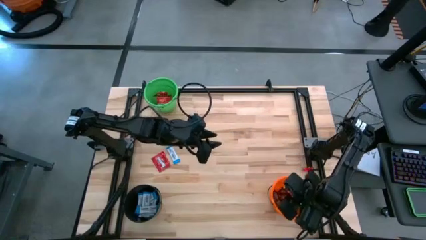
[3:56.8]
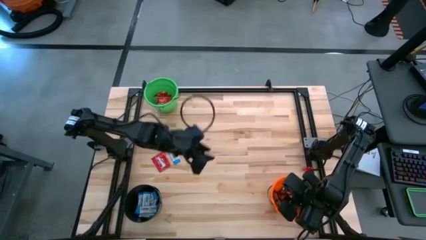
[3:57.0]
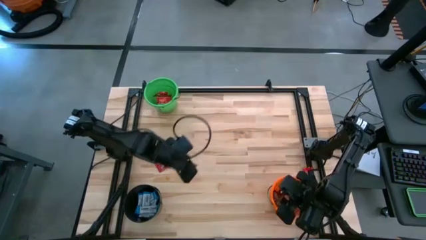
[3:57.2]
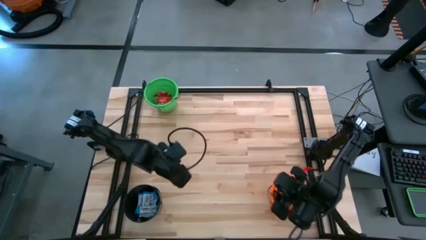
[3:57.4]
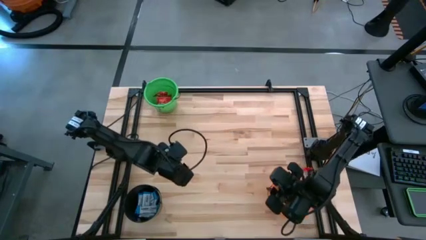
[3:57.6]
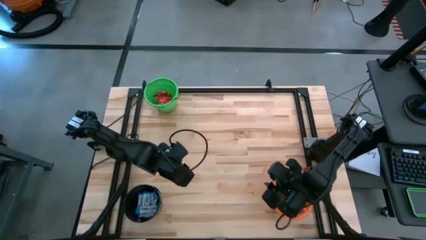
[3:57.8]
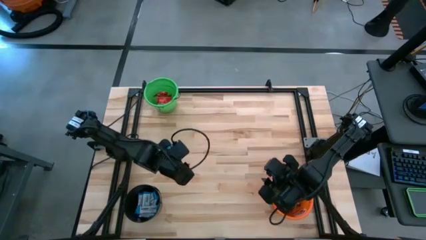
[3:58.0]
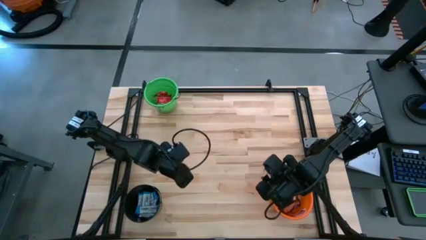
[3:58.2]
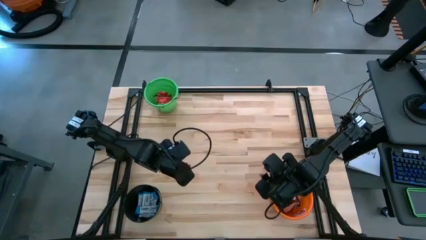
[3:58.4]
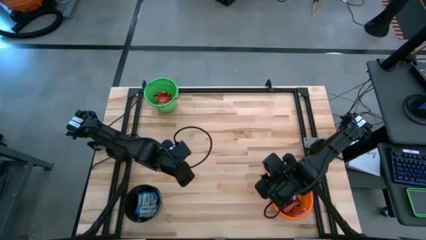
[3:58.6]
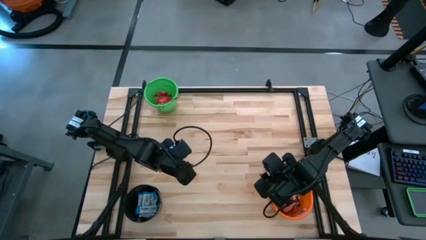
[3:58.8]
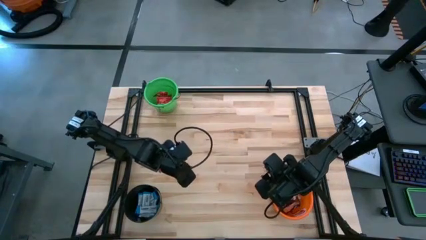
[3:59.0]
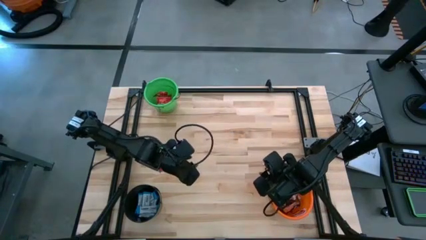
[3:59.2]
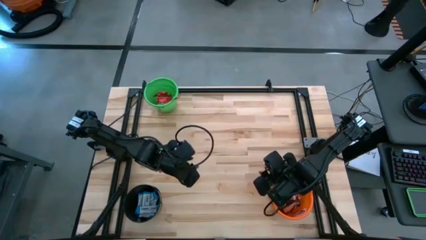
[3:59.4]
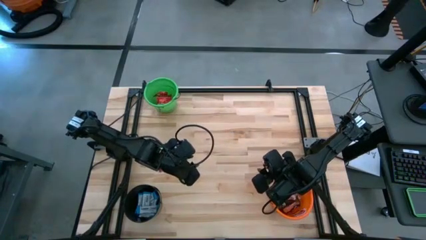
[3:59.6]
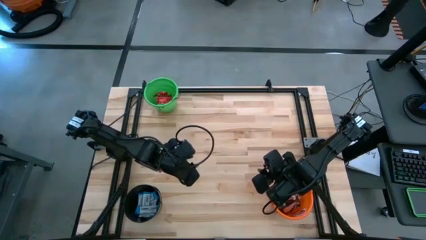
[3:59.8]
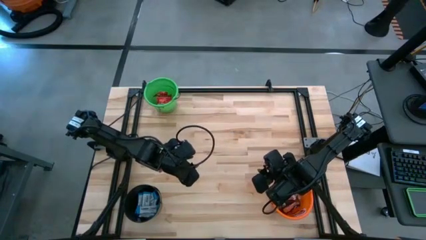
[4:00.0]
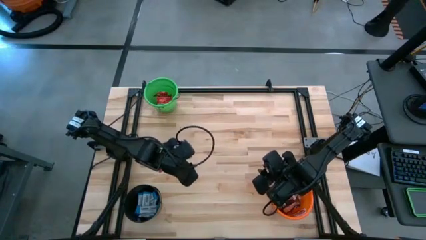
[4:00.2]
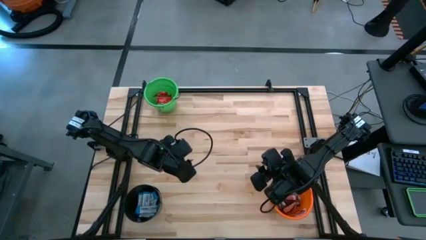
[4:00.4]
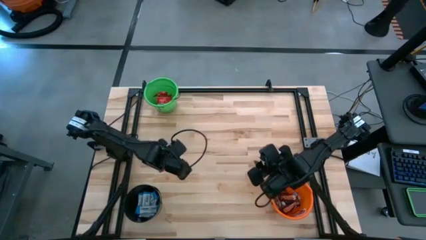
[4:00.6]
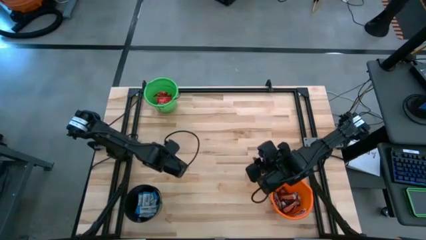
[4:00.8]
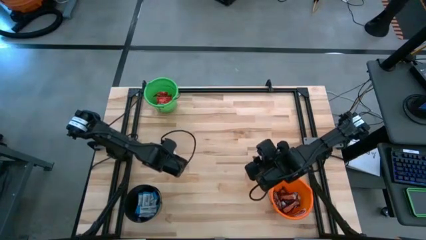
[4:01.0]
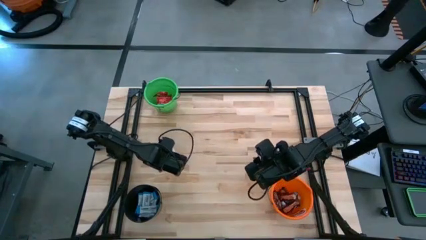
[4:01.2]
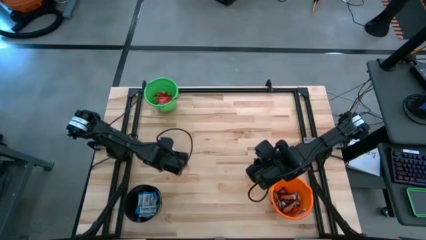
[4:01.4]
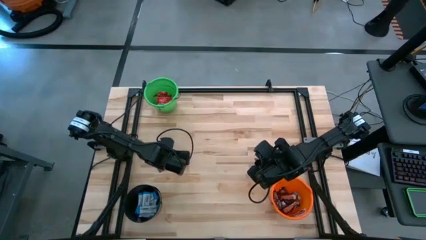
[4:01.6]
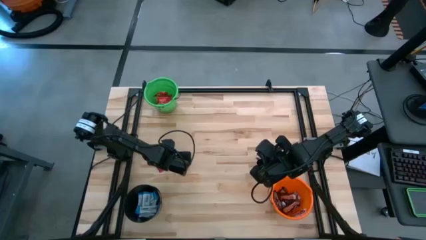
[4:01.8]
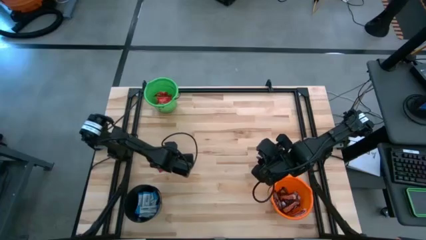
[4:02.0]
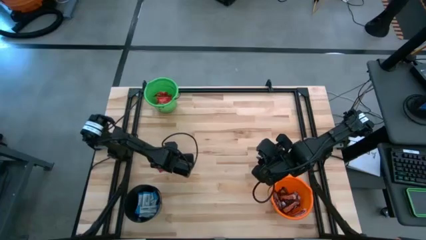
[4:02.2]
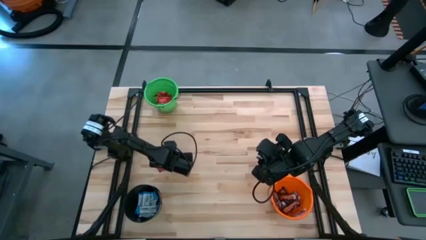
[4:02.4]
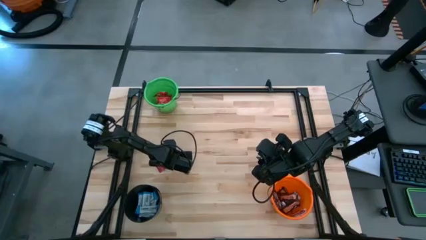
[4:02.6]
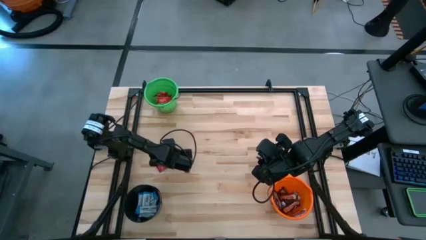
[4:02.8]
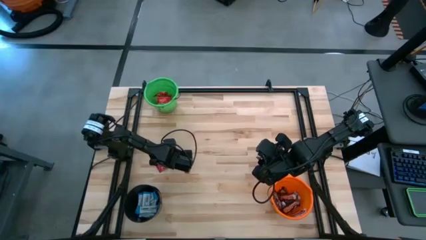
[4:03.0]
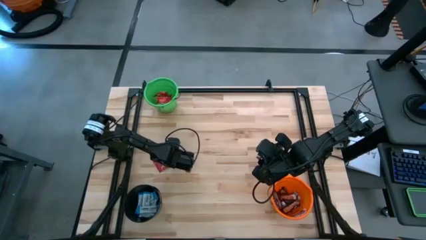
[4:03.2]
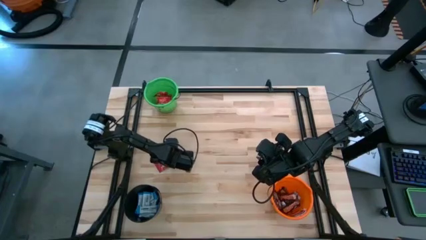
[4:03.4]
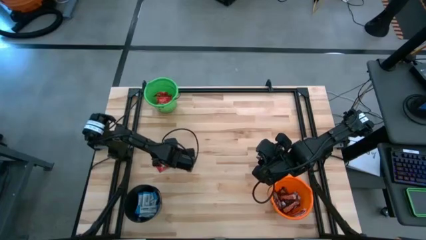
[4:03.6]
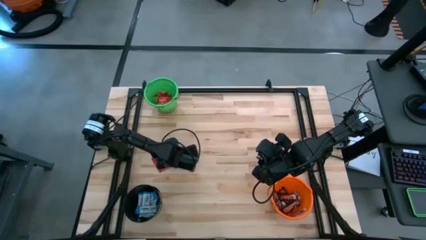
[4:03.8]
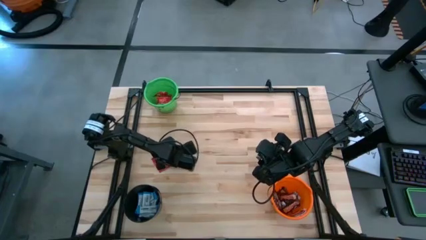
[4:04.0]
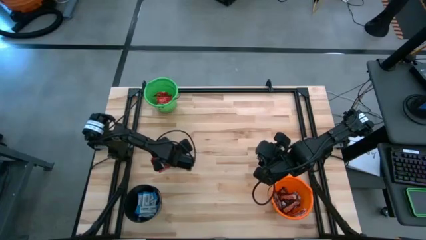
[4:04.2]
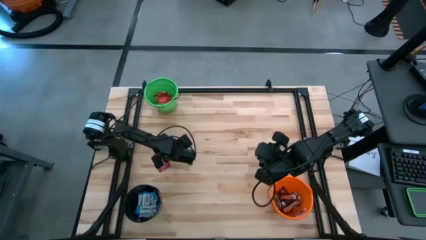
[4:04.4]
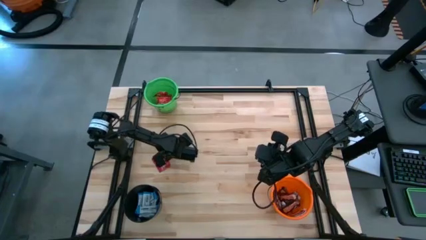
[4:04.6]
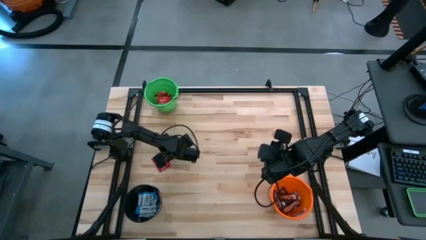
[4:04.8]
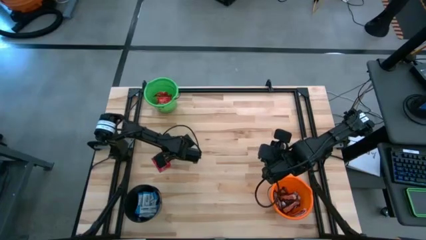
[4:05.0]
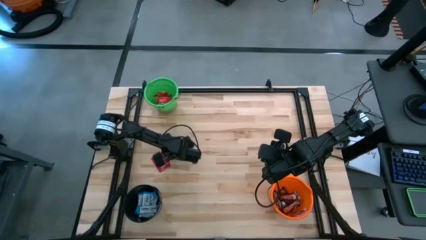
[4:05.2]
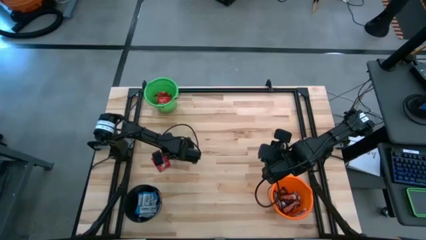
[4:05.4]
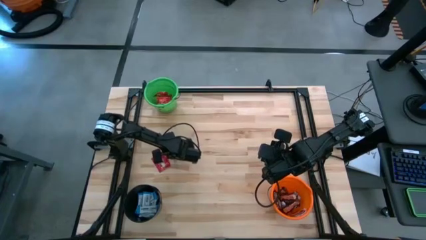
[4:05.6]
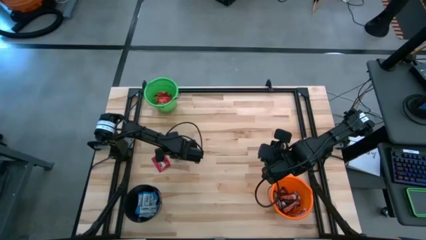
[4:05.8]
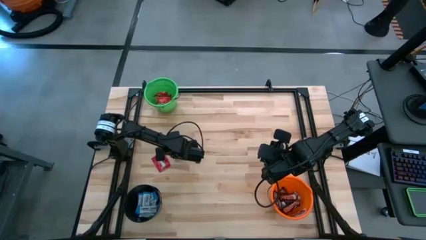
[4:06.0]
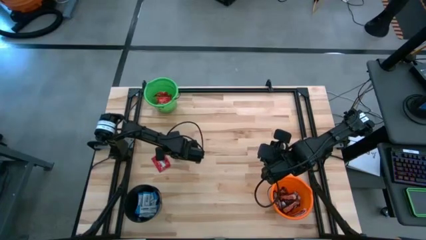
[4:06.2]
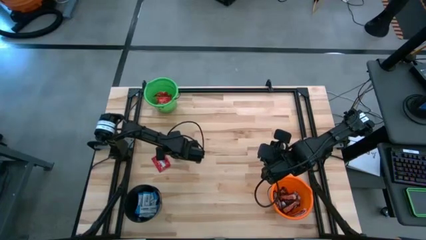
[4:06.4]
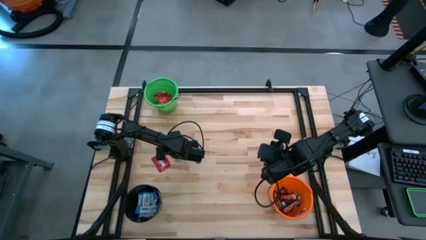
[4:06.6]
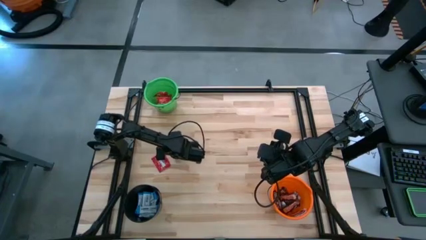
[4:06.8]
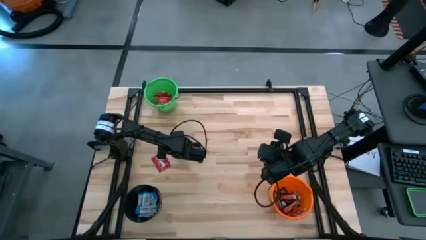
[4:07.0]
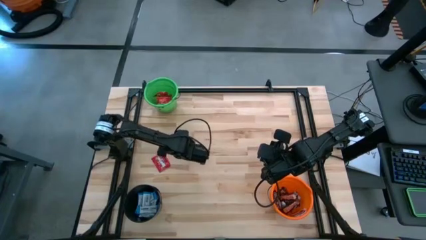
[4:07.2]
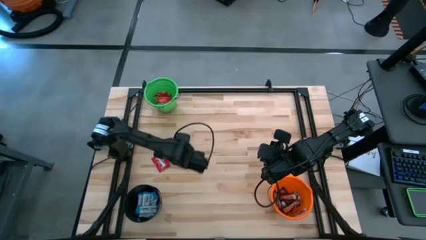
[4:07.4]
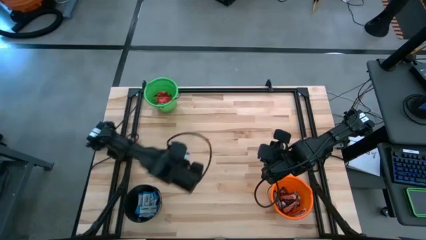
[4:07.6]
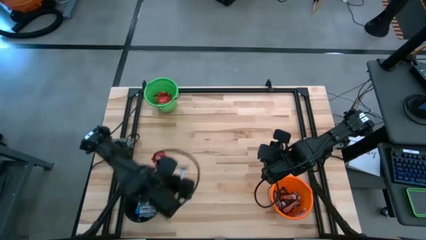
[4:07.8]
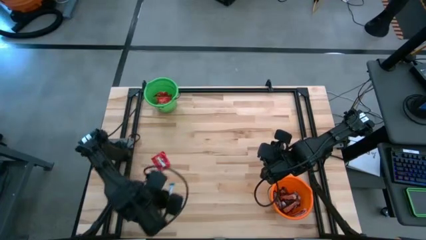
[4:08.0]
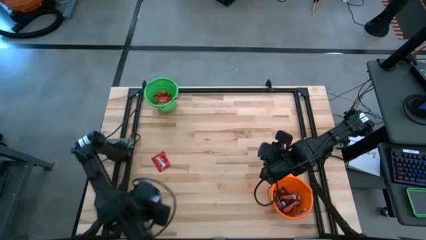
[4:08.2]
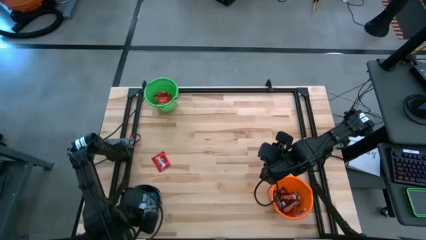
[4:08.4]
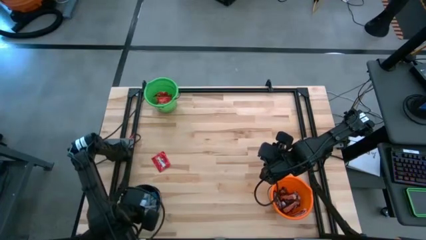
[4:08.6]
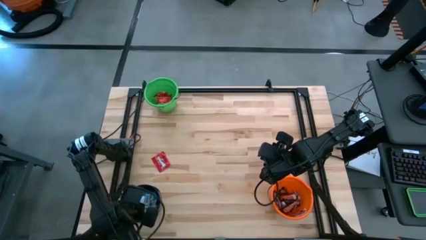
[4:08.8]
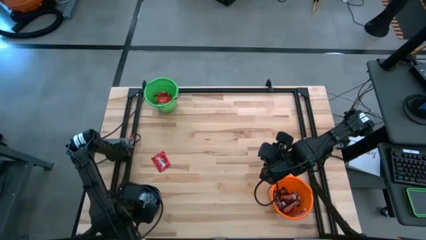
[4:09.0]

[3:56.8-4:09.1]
Task: Sort candy
Put the white chocolate into the black bucket

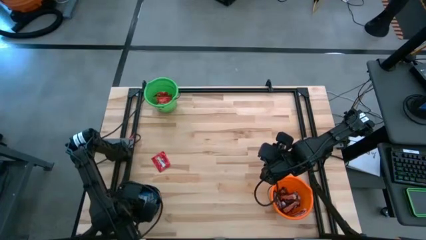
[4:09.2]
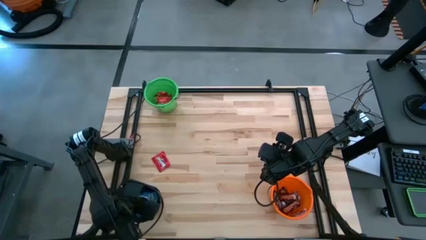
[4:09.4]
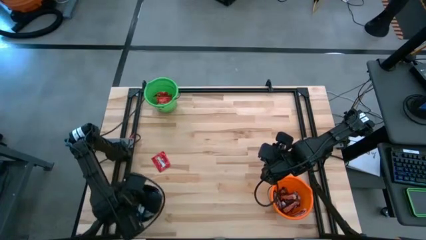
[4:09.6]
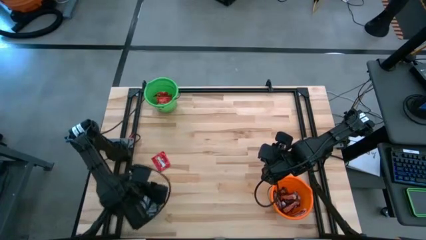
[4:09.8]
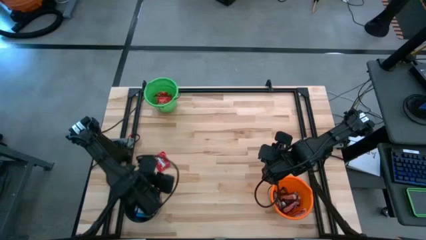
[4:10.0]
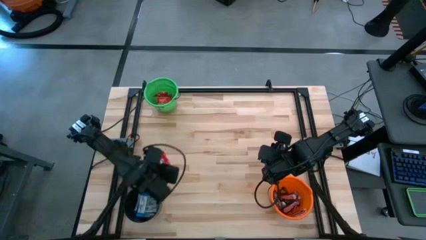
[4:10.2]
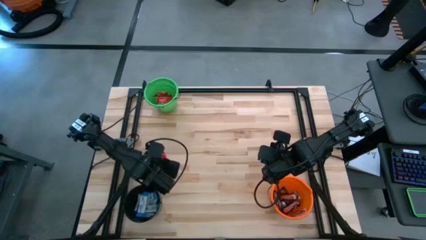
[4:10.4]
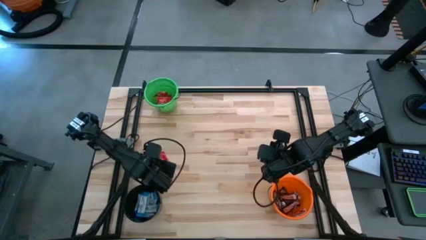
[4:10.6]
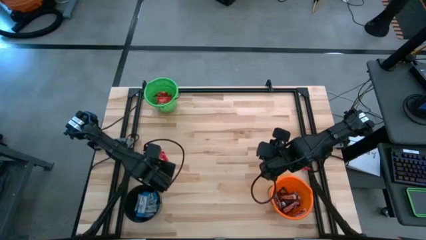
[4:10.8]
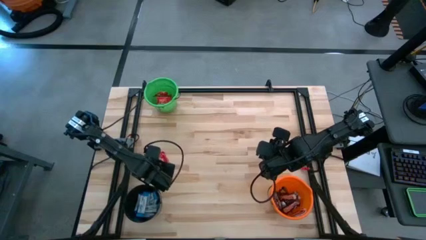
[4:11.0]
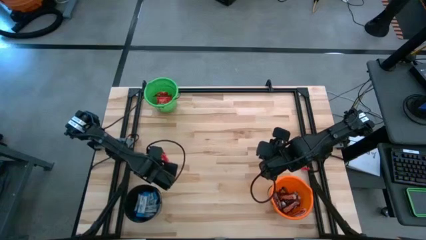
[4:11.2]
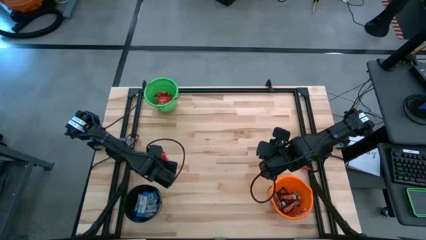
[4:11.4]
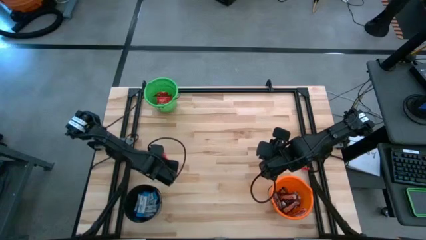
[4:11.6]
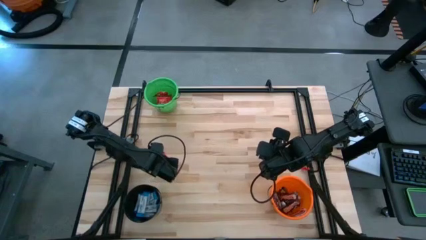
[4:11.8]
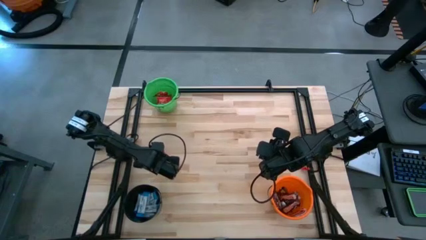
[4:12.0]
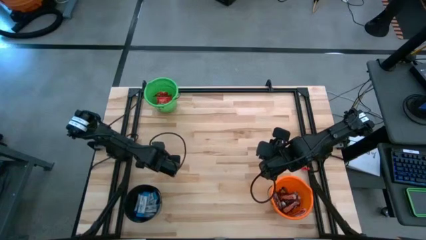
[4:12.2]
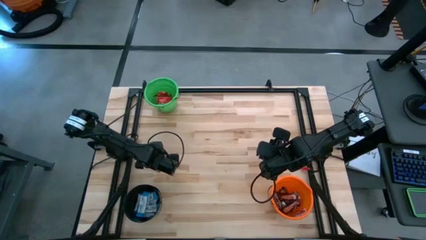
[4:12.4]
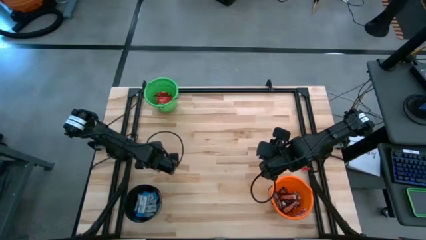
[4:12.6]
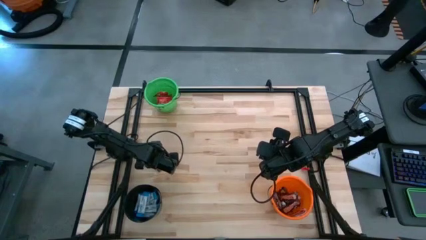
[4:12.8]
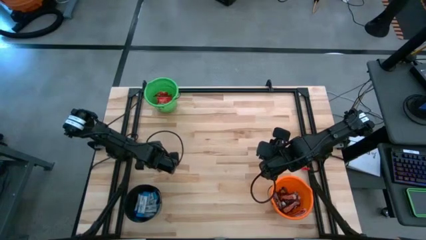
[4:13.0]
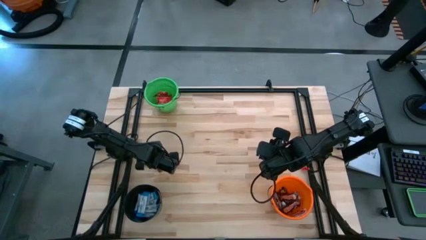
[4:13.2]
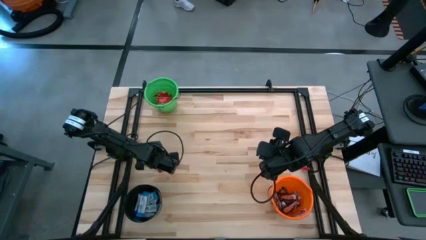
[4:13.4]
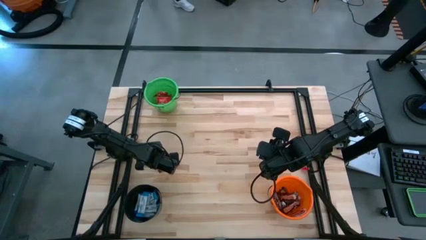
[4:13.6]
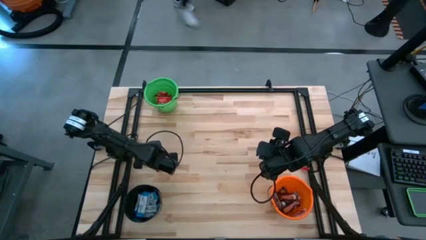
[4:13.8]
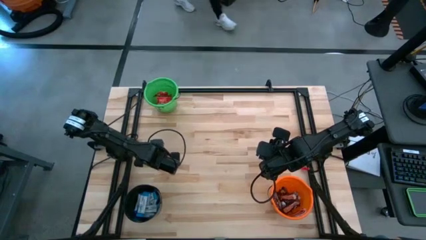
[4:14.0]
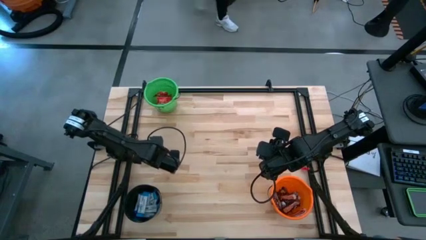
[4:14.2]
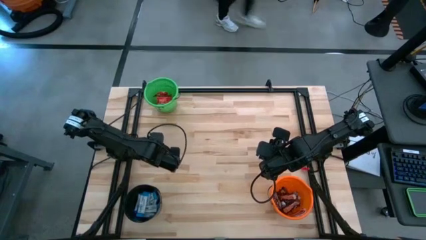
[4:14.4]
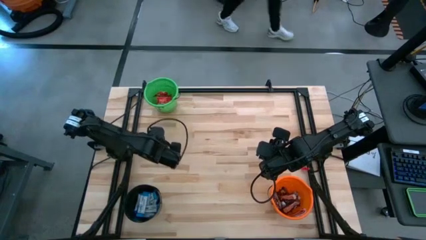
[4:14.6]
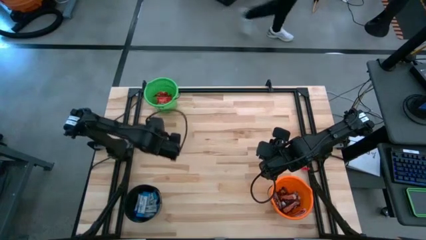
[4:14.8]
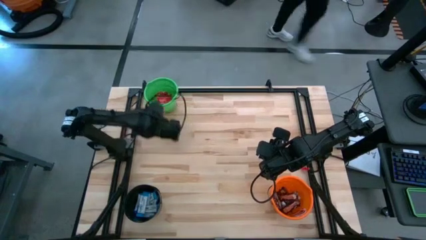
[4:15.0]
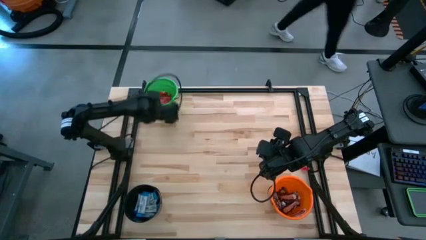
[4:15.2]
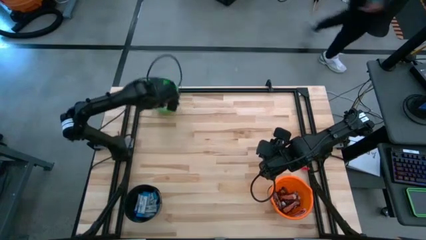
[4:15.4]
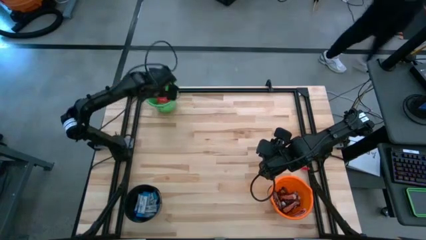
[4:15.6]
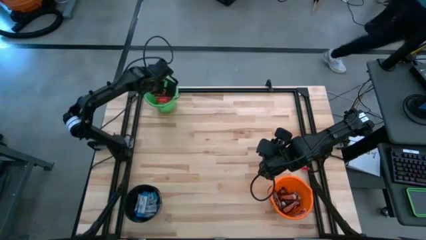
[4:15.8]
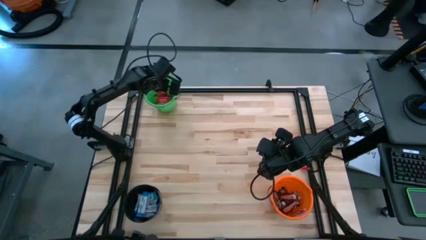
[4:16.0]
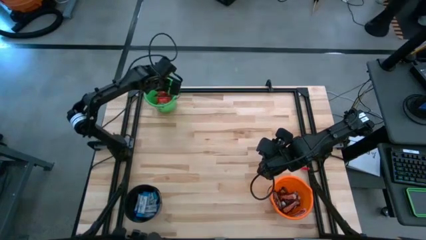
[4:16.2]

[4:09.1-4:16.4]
Put the red candy into the green bucket
